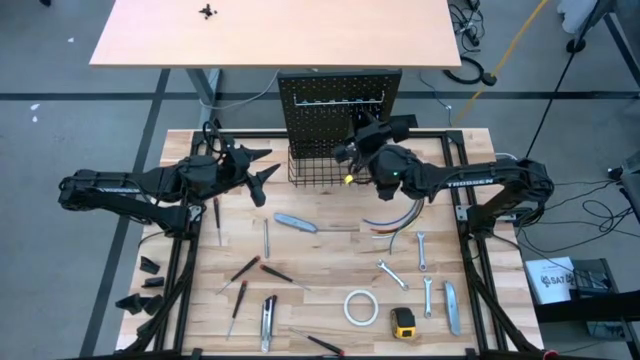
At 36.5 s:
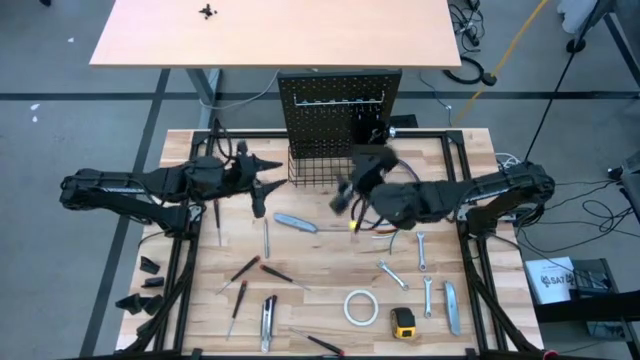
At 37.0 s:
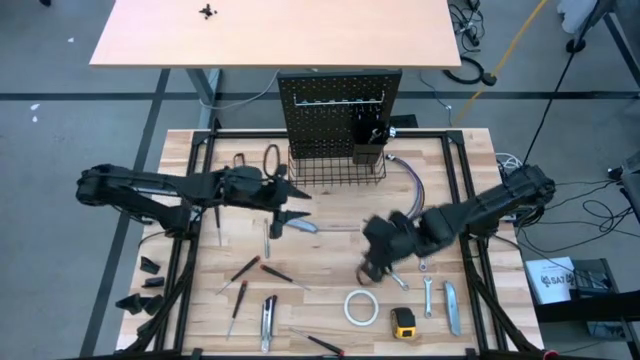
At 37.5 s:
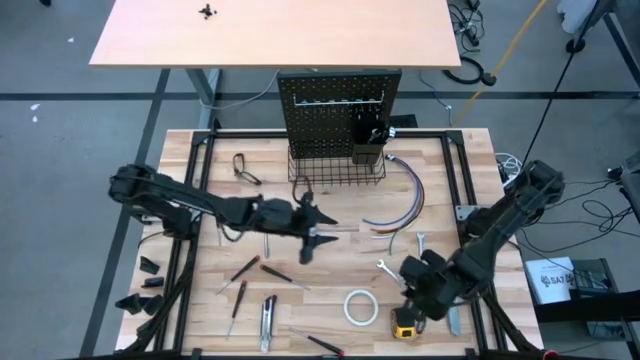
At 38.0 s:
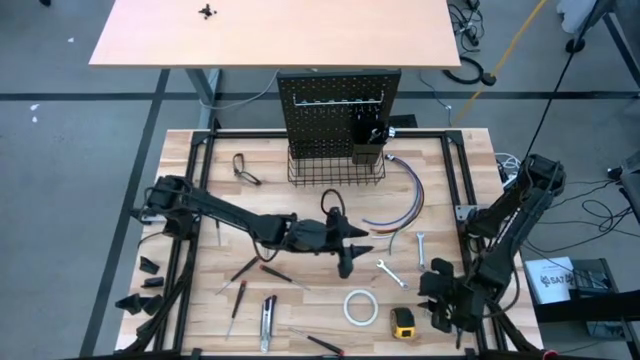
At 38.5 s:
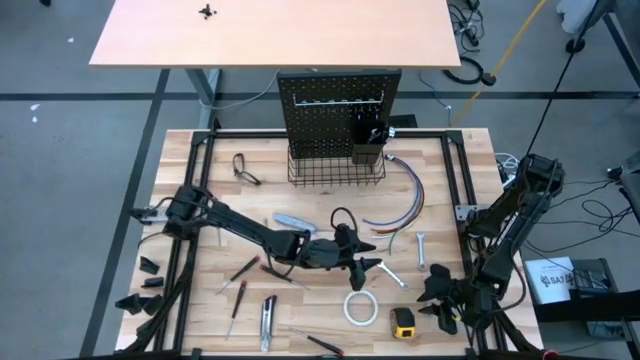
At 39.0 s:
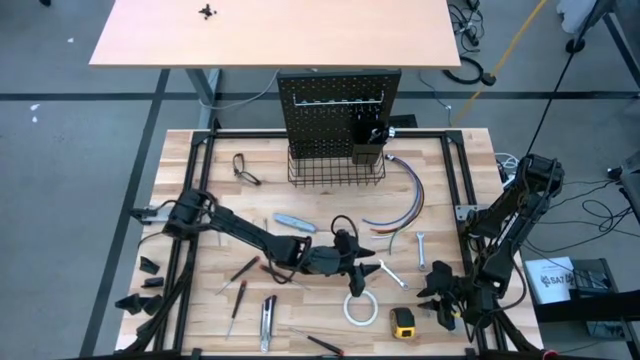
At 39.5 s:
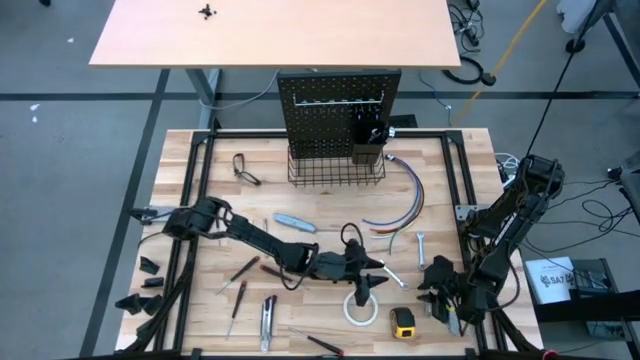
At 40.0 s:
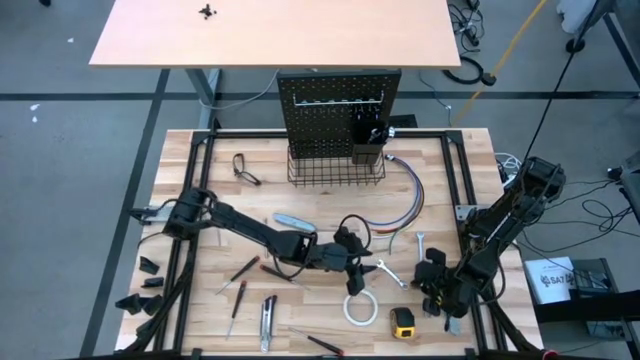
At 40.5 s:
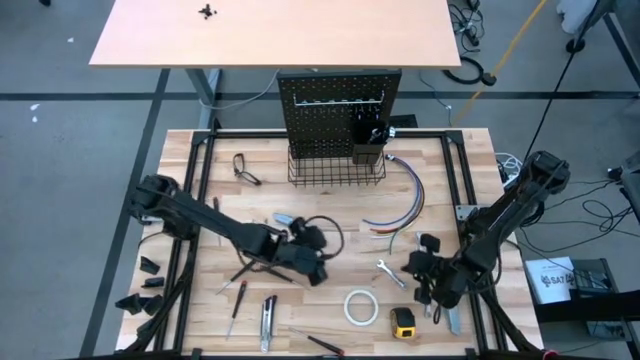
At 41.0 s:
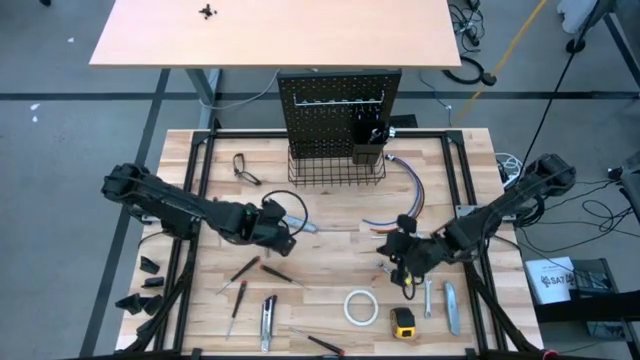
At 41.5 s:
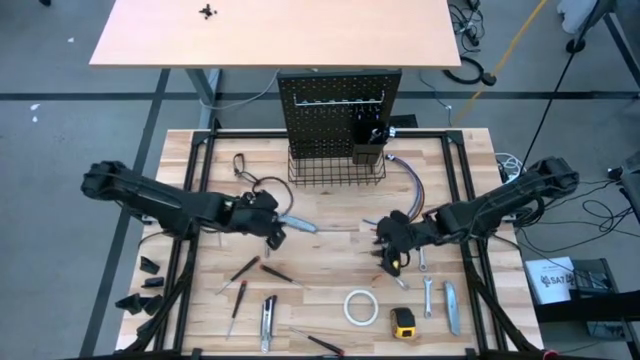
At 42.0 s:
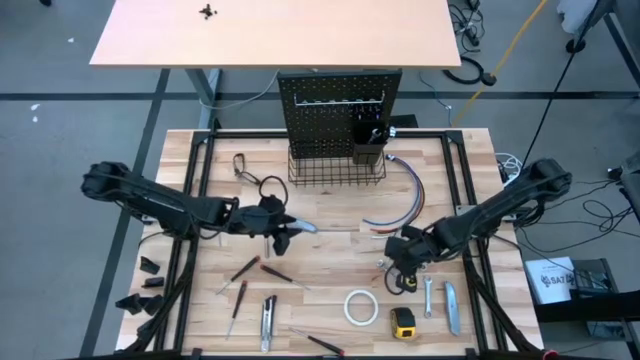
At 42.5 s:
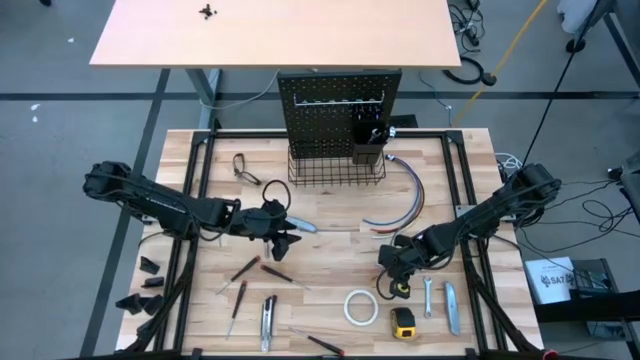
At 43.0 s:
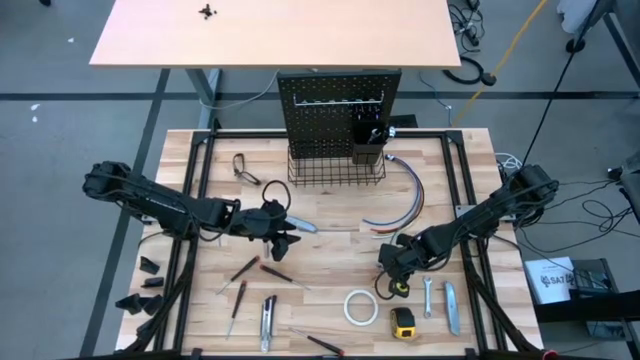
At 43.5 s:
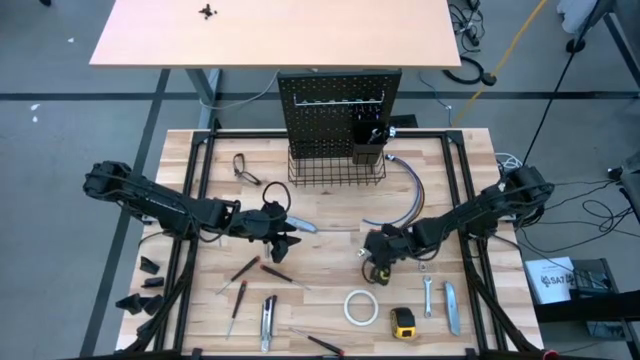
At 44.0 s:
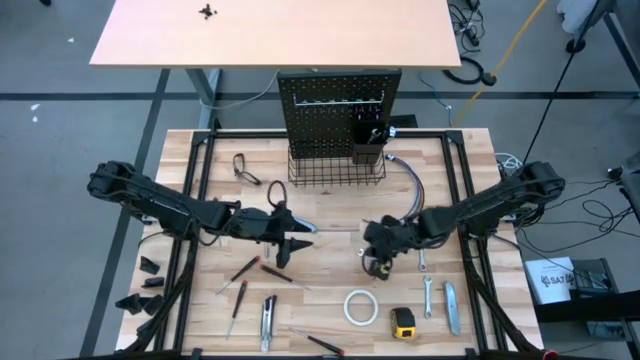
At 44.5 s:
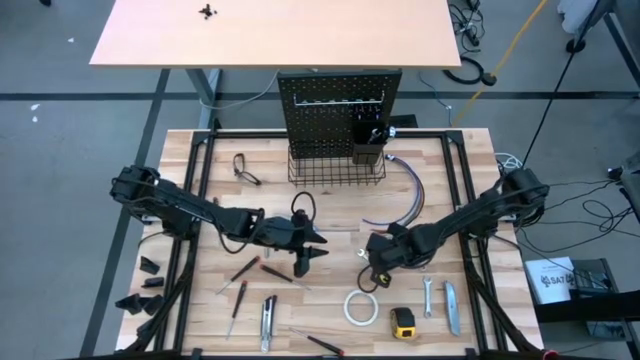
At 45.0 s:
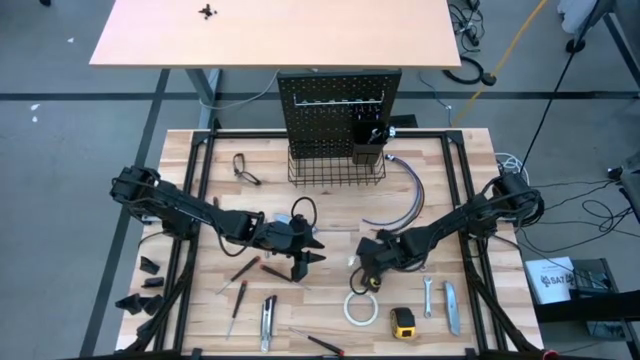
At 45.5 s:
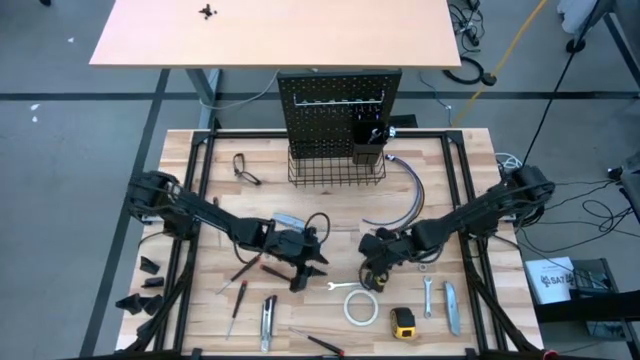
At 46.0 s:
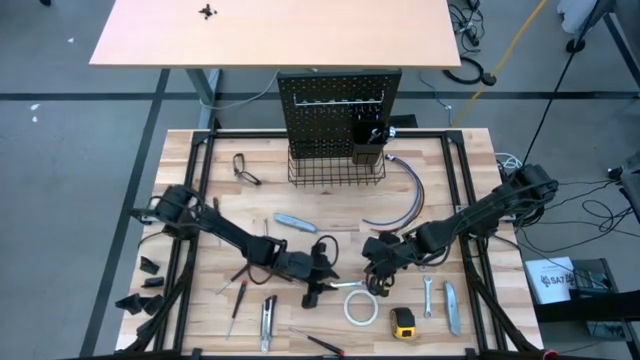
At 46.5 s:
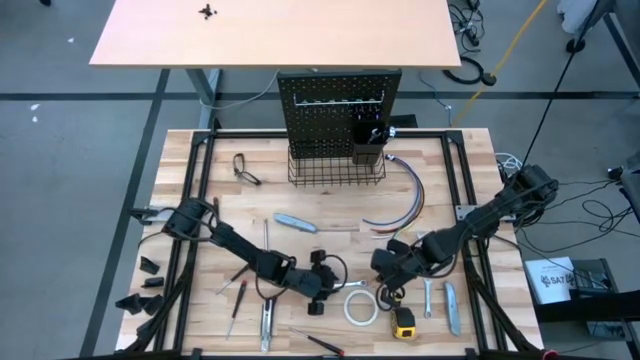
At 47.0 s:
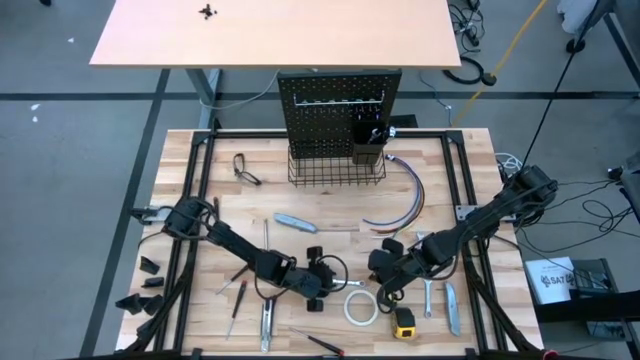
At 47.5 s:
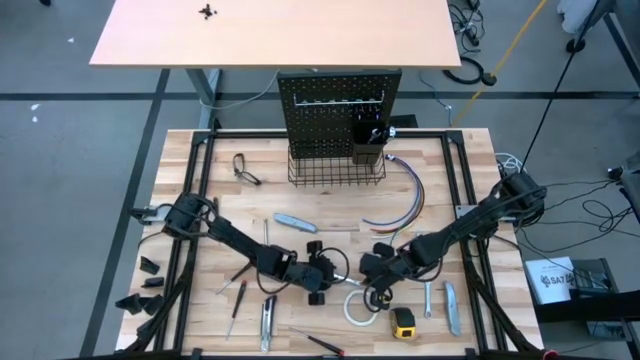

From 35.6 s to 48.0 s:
Task: Hang tools onto peg board
Put the wrench into the black bin on the pegboard

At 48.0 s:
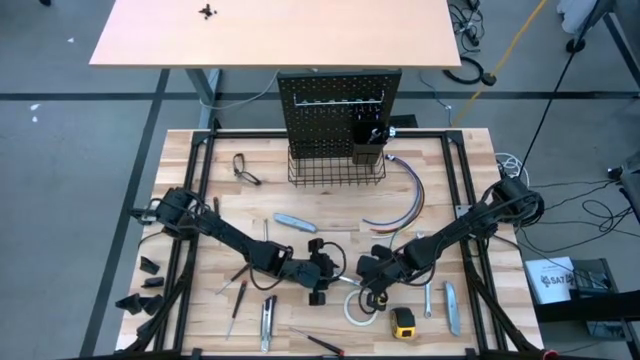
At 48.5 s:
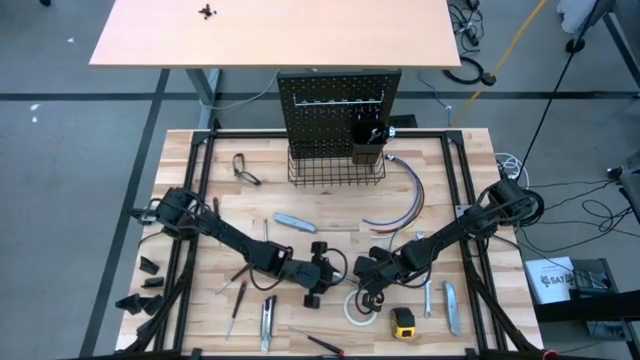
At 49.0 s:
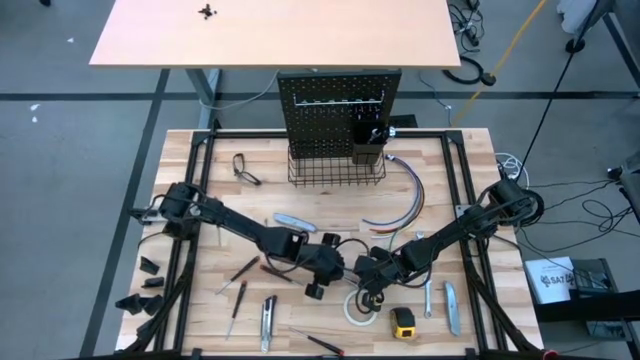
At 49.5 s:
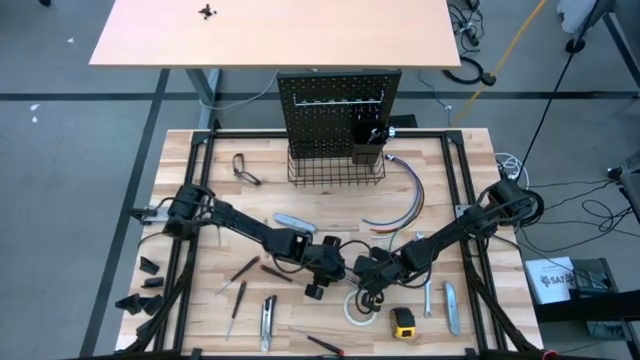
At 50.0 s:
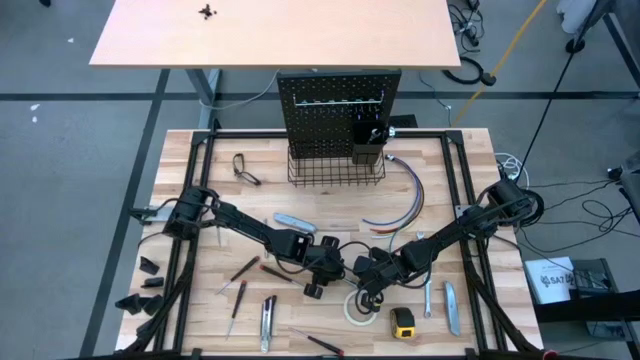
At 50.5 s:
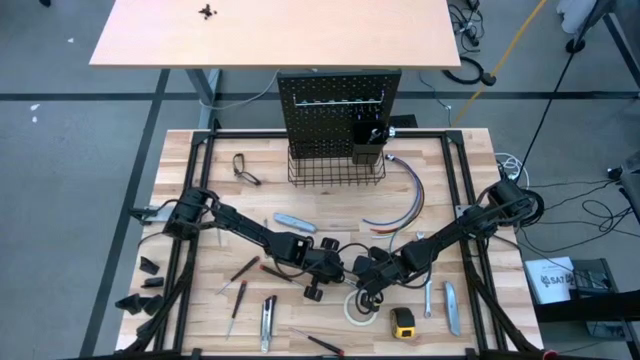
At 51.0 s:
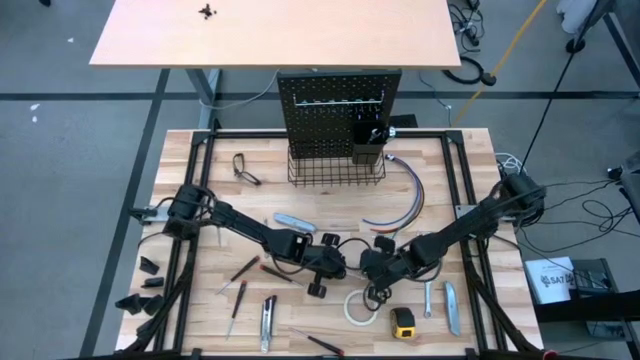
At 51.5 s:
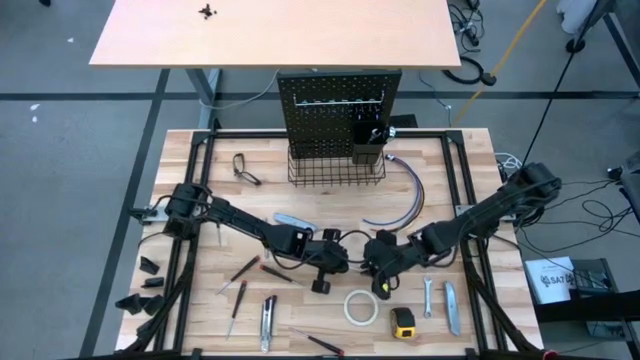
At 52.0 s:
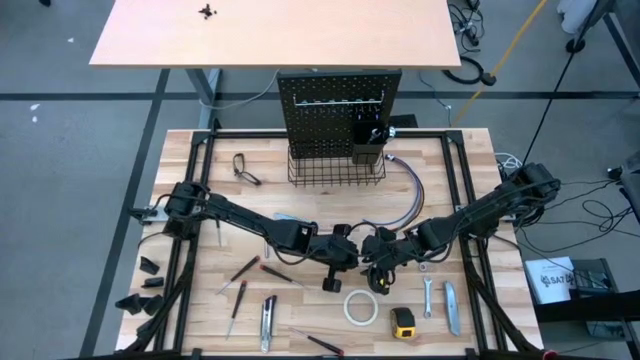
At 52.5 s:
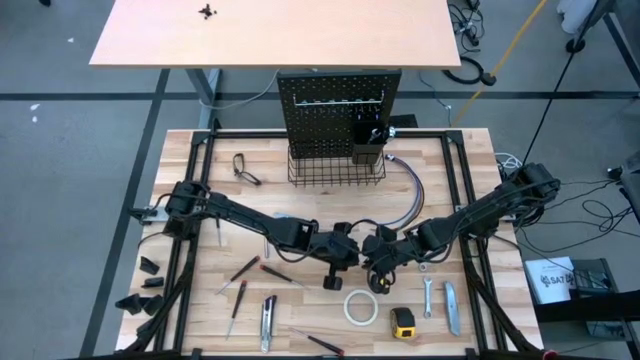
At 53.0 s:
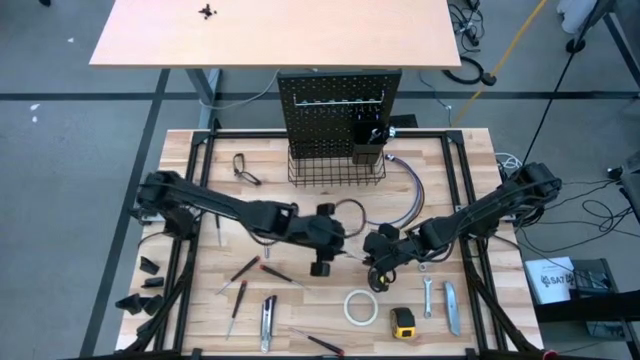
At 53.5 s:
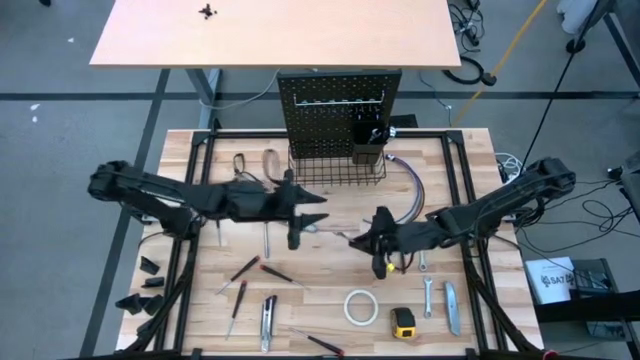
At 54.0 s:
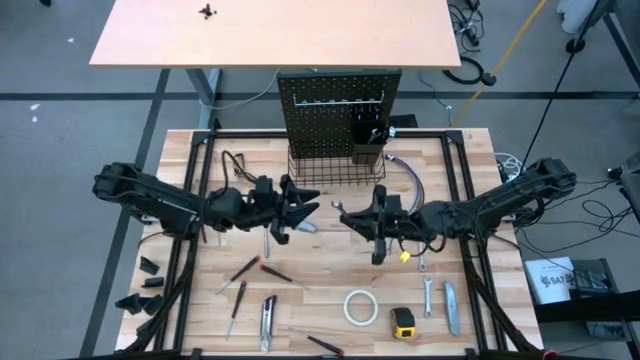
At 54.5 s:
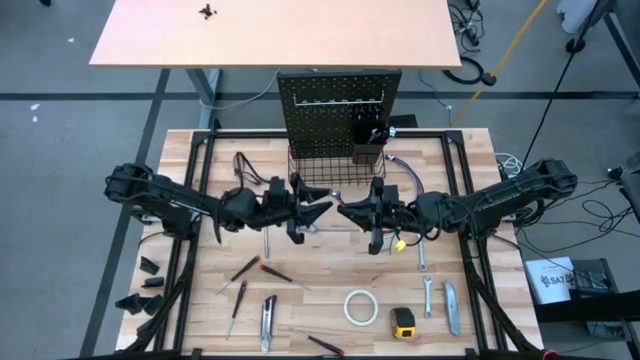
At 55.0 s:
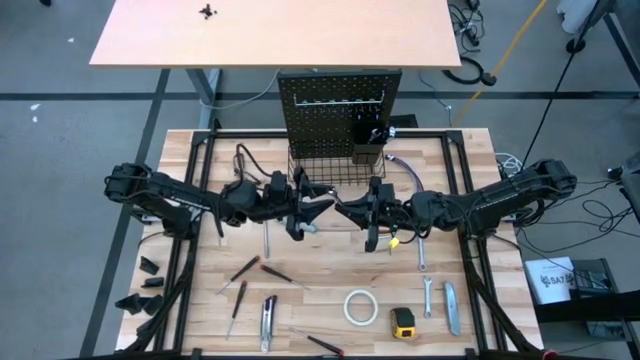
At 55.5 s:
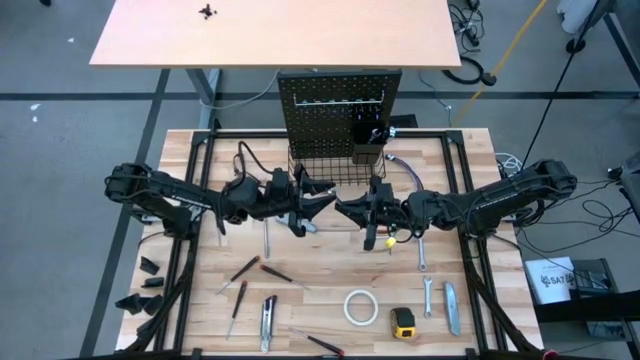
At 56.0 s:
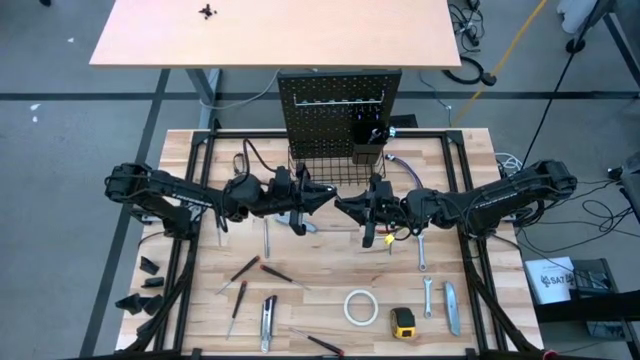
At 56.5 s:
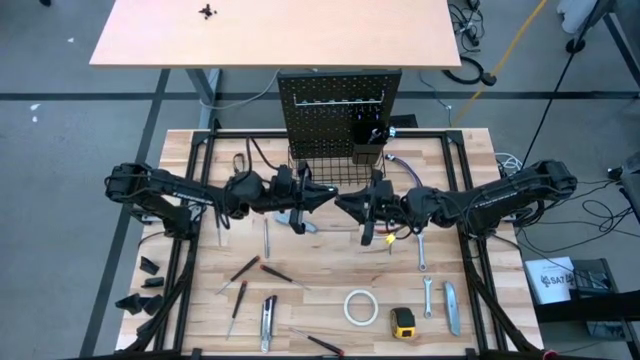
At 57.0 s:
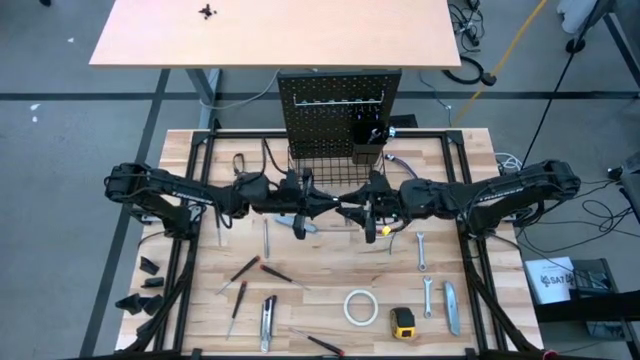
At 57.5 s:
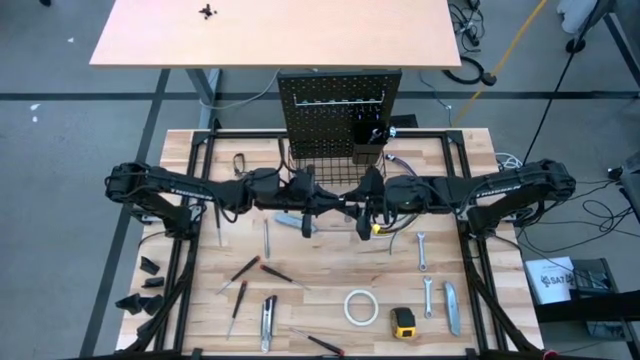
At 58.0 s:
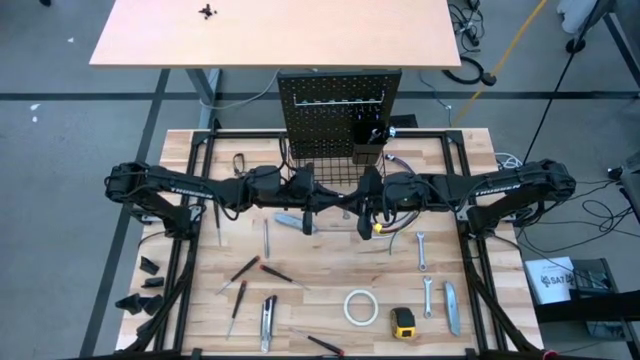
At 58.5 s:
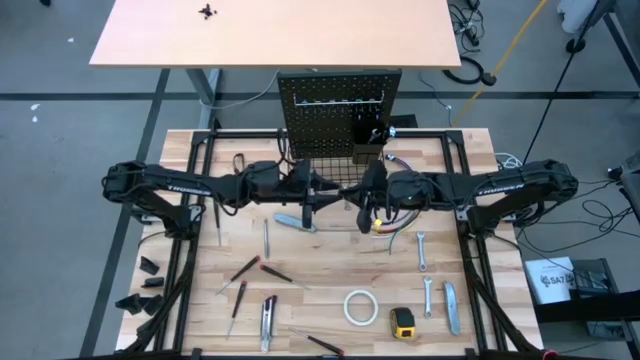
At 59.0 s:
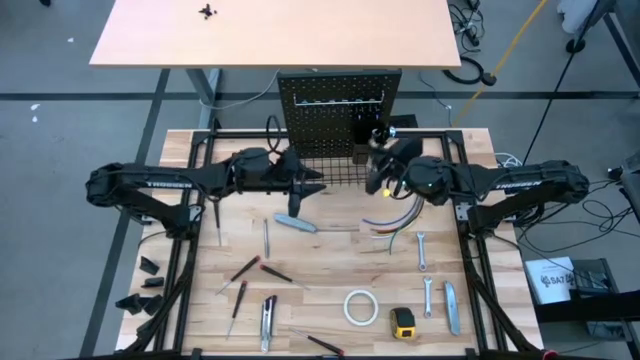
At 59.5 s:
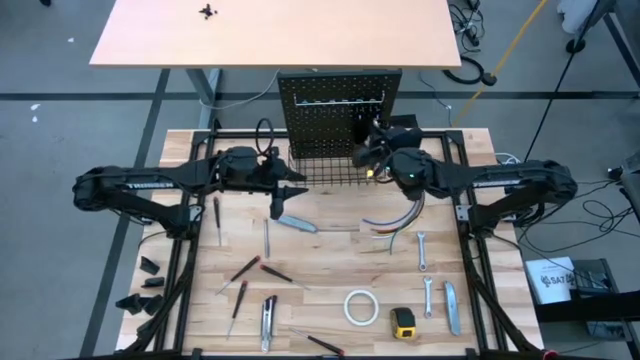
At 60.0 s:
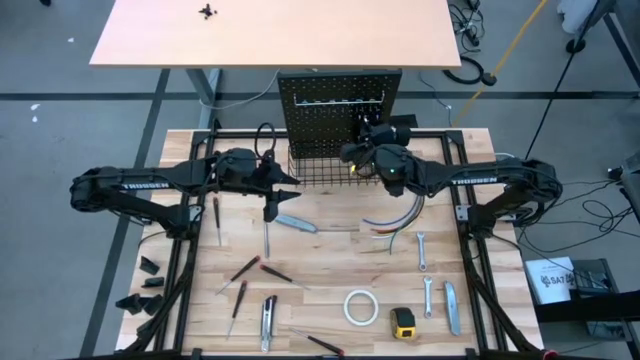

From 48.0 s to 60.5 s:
Put the wrench into the black bin on the pegboard
